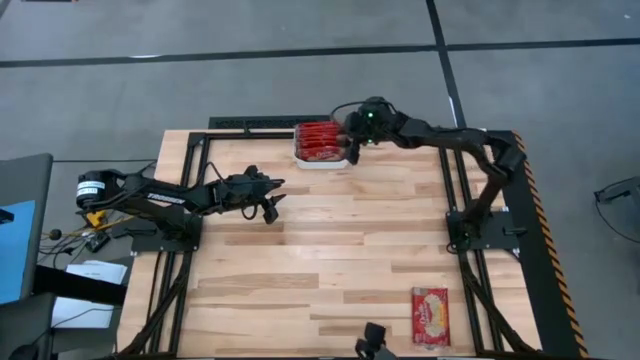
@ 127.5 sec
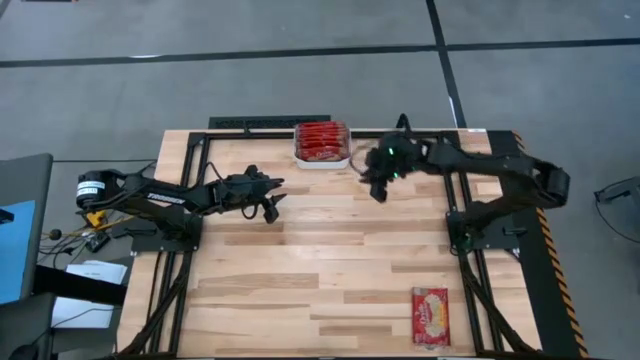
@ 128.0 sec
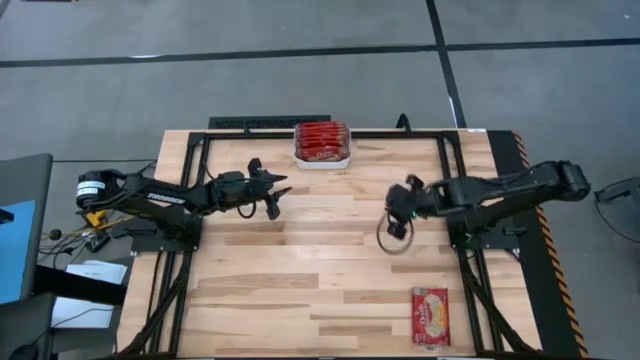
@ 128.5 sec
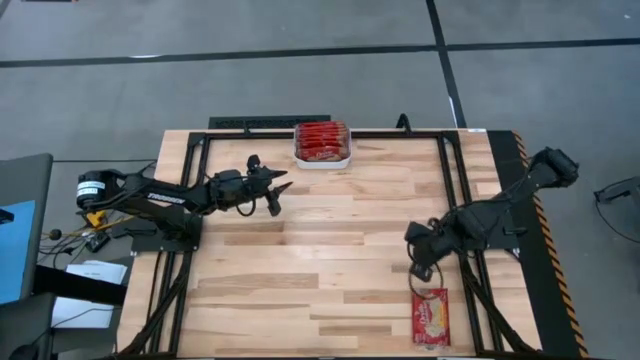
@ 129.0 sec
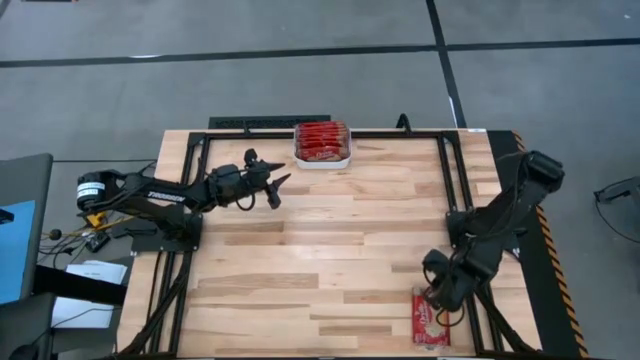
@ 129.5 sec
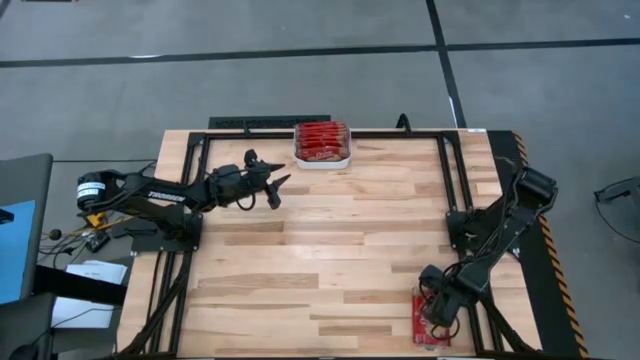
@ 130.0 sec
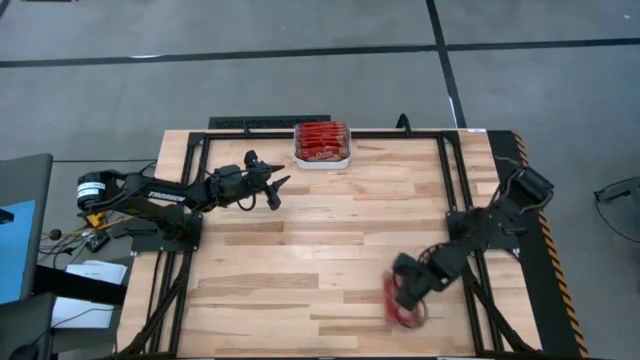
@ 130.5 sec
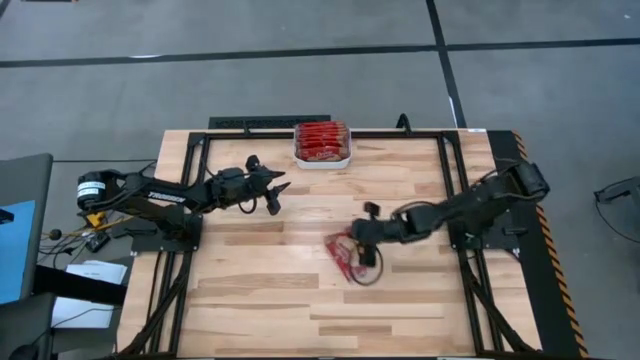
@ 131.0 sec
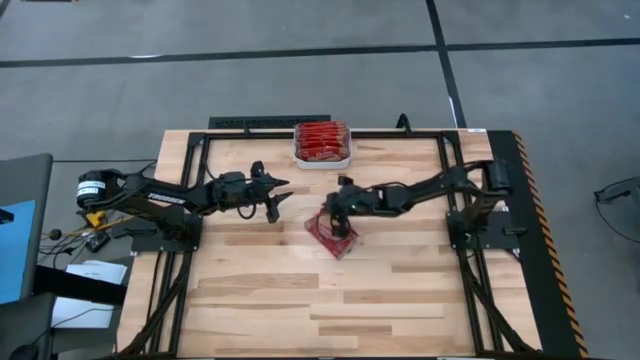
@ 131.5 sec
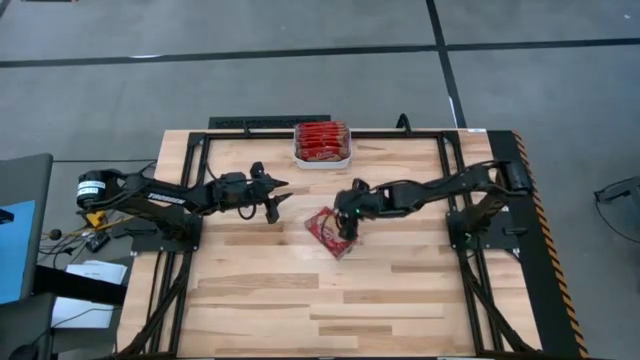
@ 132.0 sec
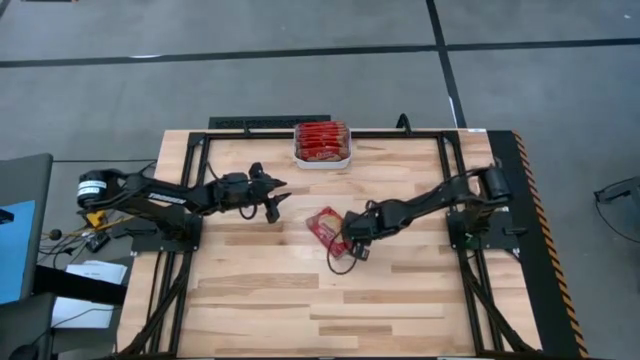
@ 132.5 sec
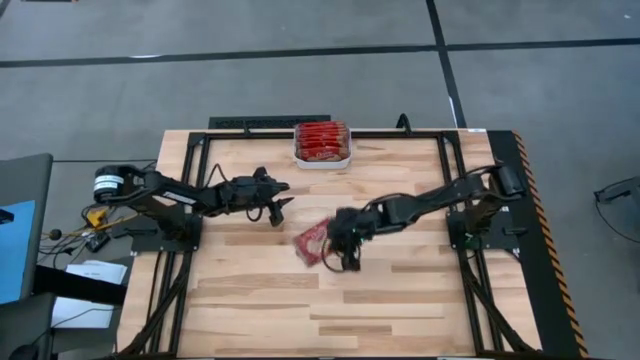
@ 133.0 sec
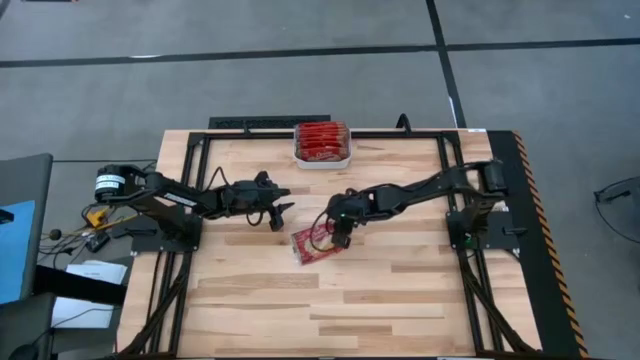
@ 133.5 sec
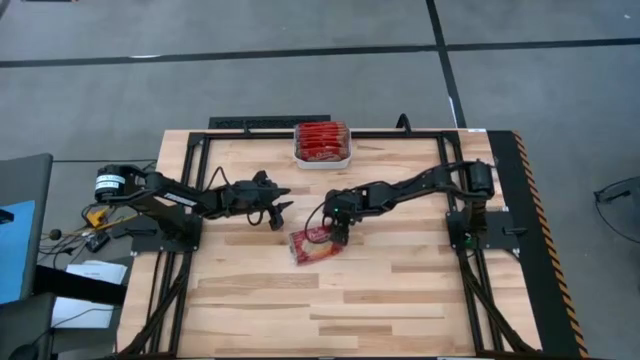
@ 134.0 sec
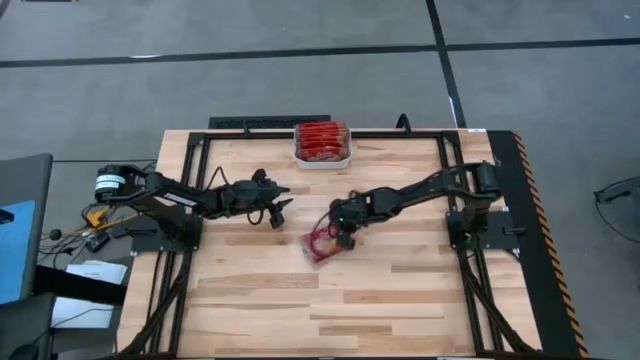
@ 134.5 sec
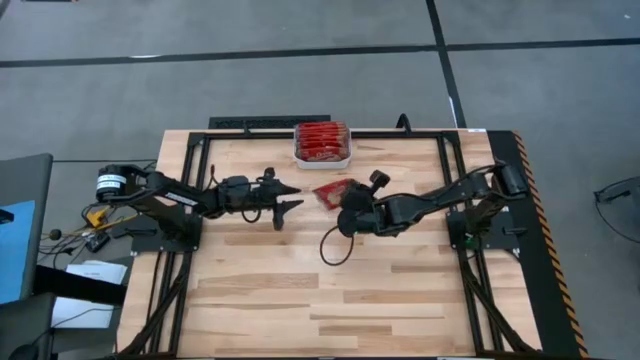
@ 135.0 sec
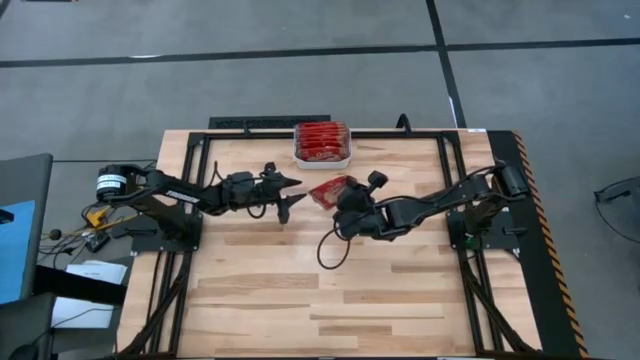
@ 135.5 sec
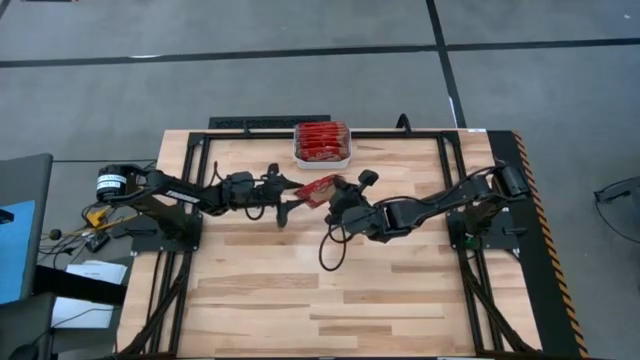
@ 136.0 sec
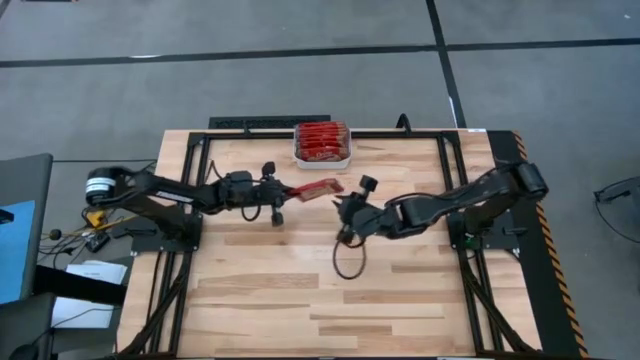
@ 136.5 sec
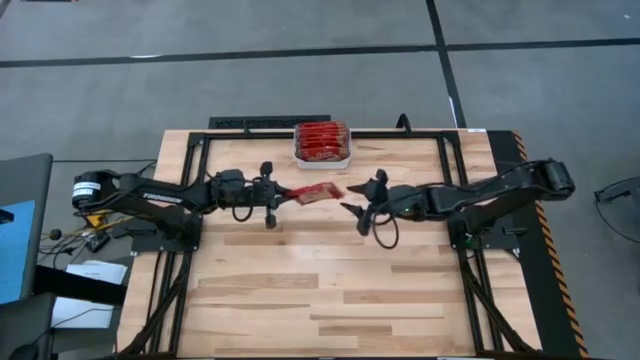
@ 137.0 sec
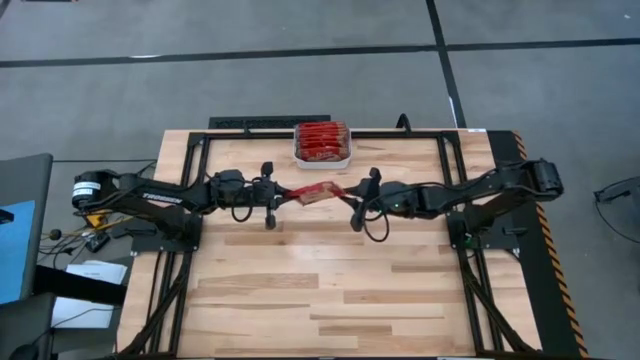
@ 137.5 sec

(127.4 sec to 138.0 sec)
Task: Sort popcorn bags into baskets
Put the red popcorn bag into the white bin

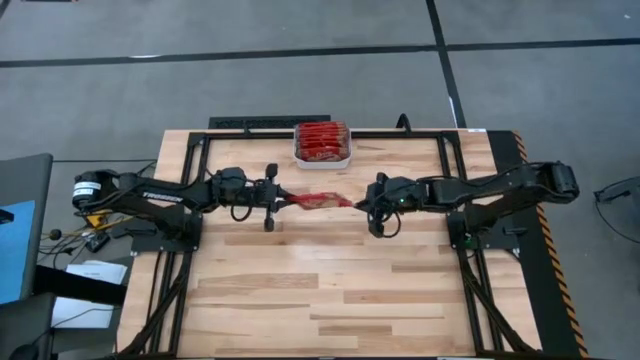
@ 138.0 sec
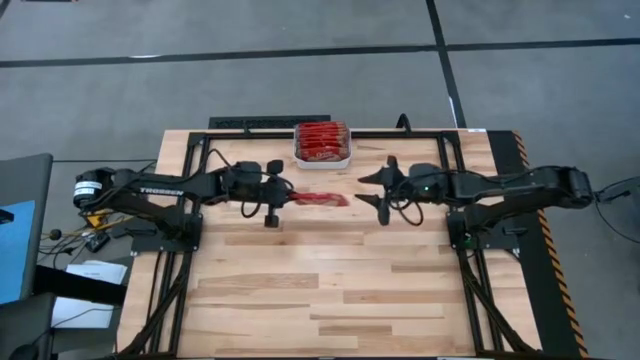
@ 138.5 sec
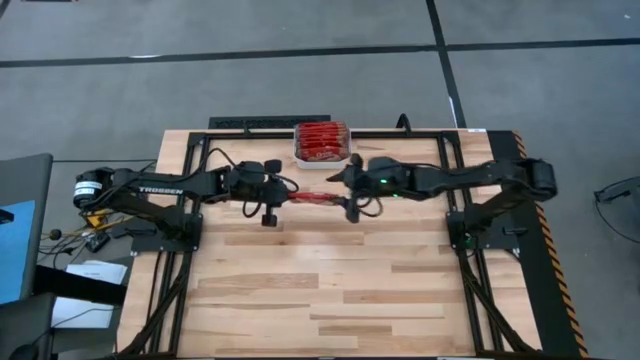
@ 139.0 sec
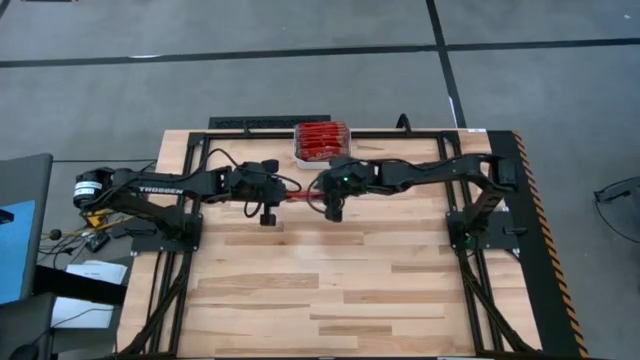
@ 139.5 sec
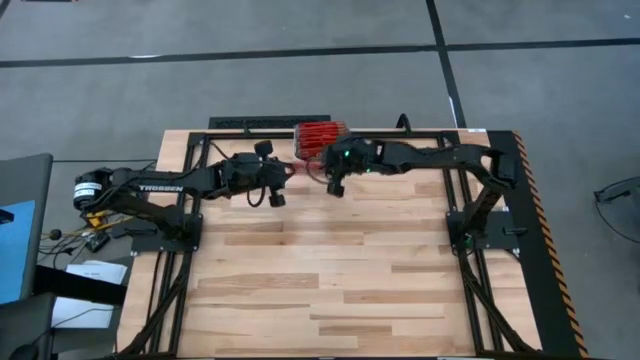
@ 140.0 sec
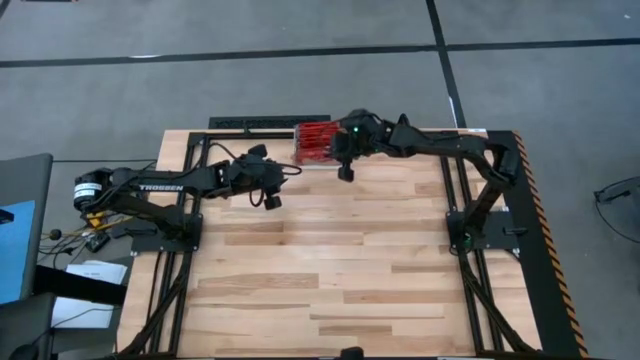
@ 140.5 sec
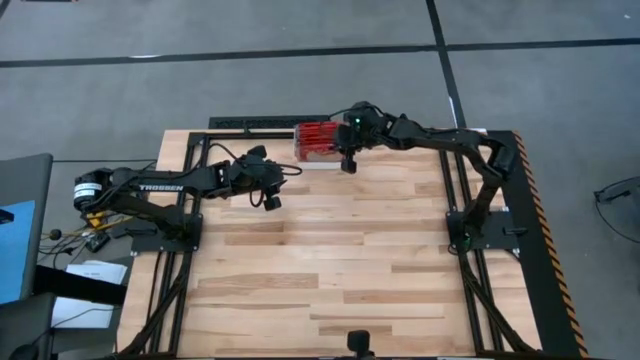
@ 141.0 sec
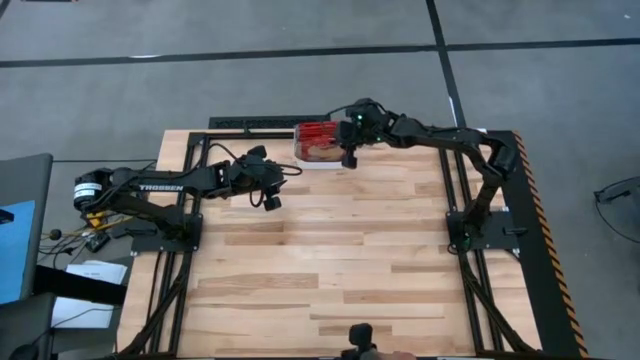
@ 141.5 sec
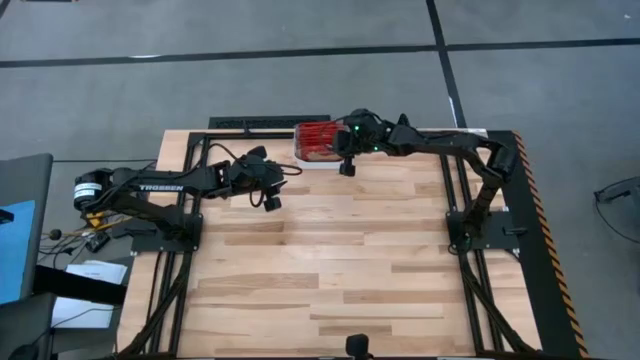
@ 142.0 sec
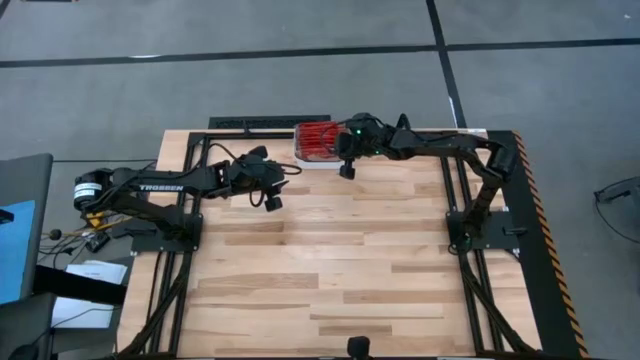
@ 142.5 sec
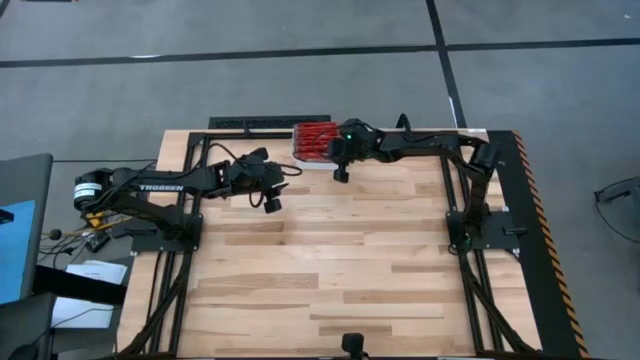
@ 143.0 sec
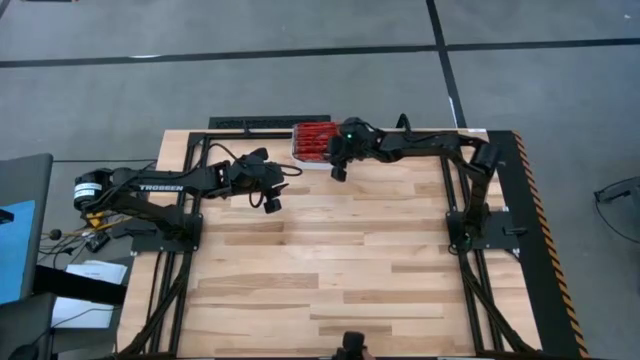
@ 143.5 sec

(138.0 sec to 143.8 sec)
Put the red popcorn bag into the white bin

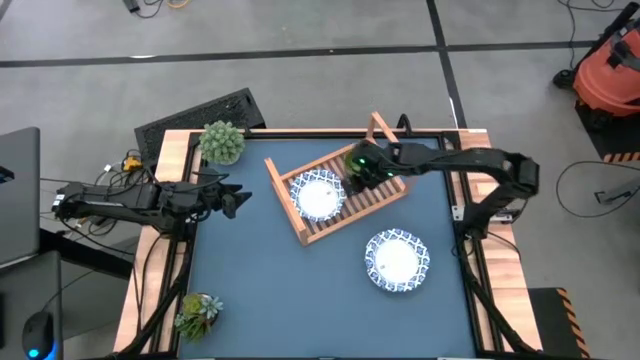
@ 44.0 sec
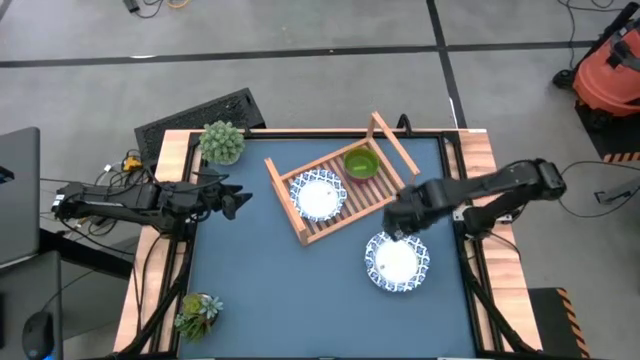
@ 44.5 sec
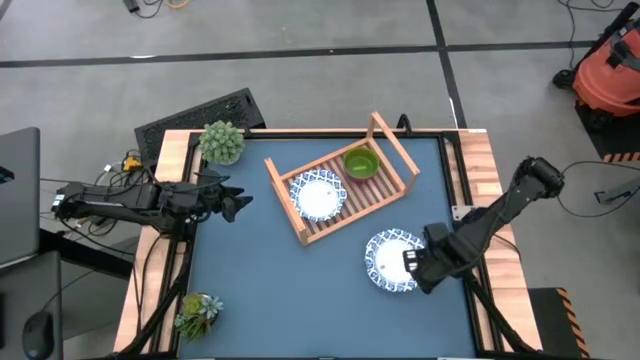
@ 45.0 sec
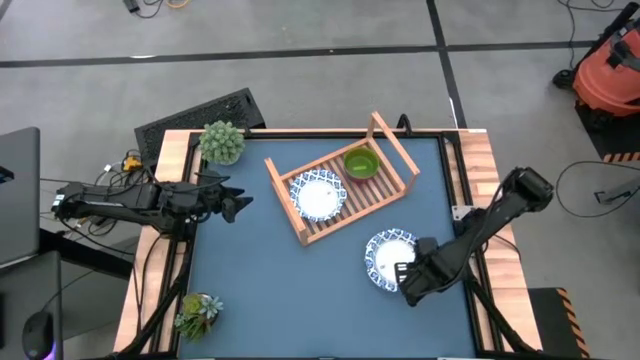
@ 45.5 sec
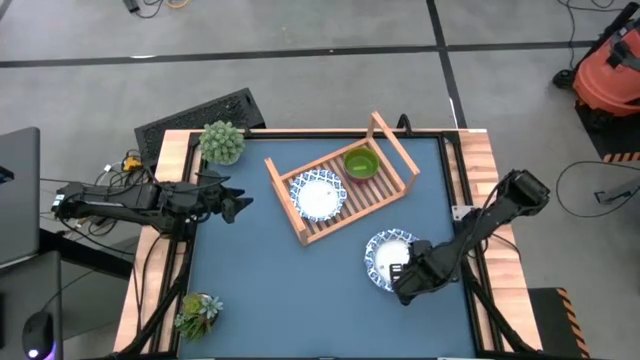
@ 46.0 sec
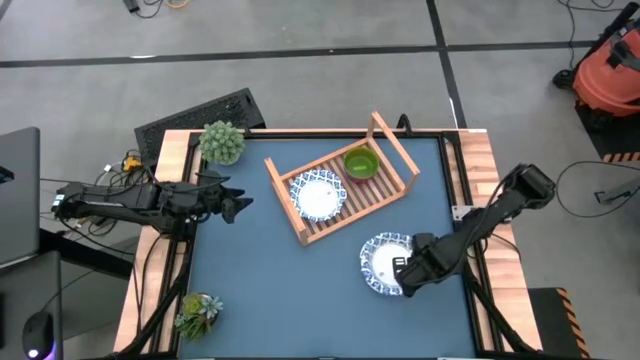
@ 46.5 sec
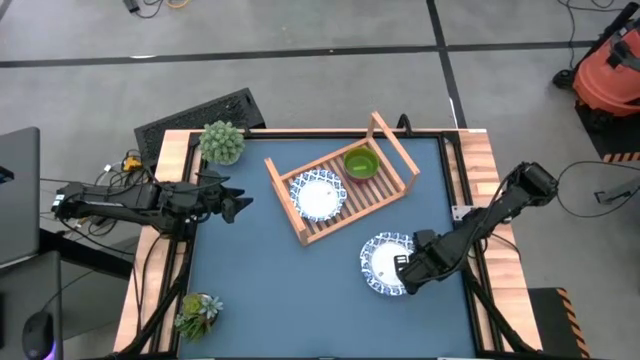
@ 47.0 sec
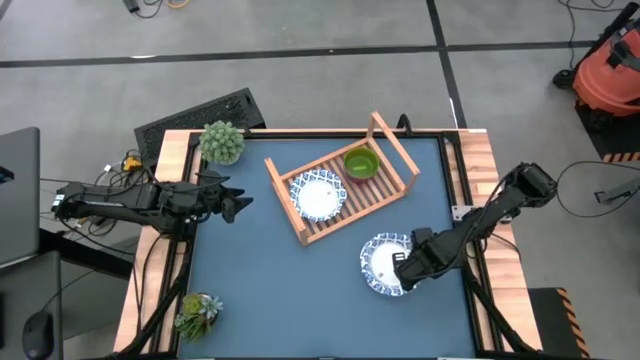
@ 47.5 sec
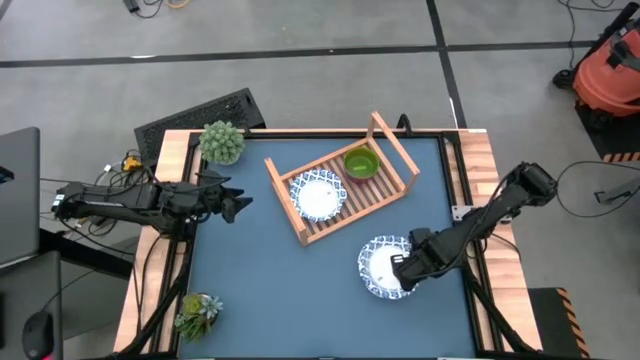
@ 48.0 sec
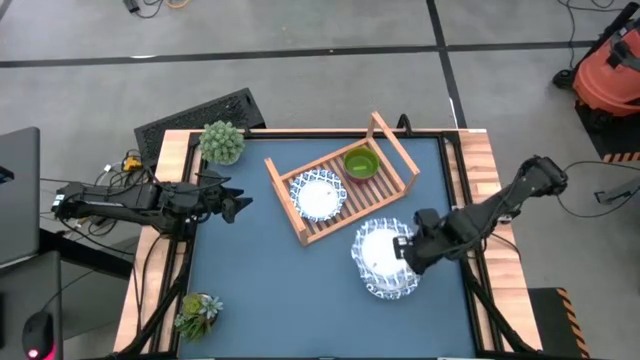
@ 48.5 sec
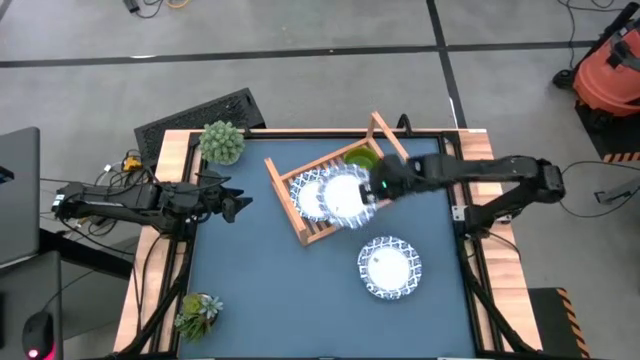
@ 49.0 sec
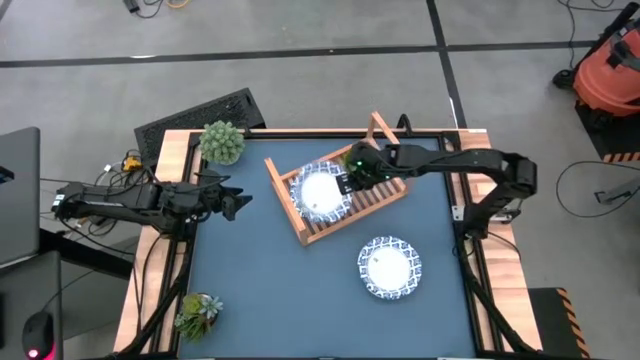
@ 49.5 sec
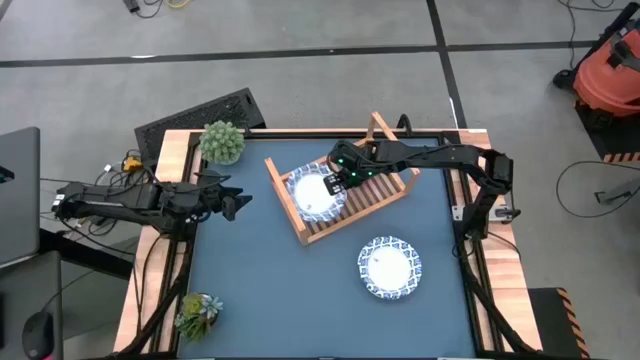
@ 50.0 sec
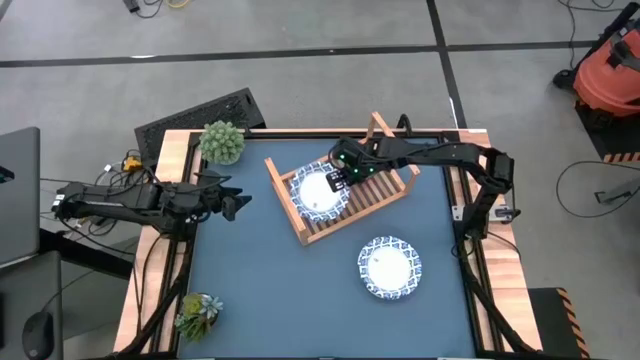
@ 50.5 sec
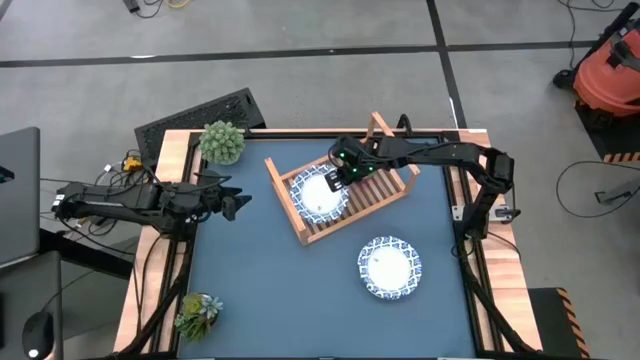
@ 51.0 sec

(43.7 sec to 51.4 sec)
Task: Place and stack bowls onto a shelf
Stack the blue patterned bowl on top of the blue patterned bowl on the shelf
